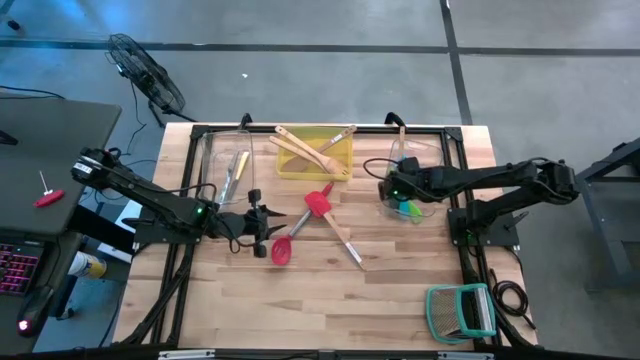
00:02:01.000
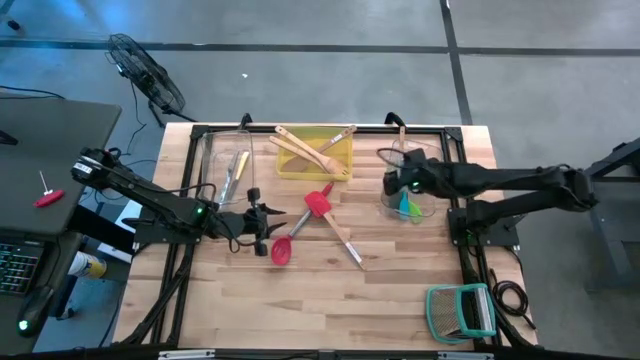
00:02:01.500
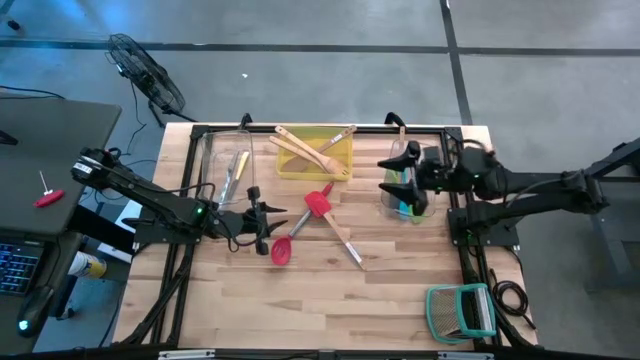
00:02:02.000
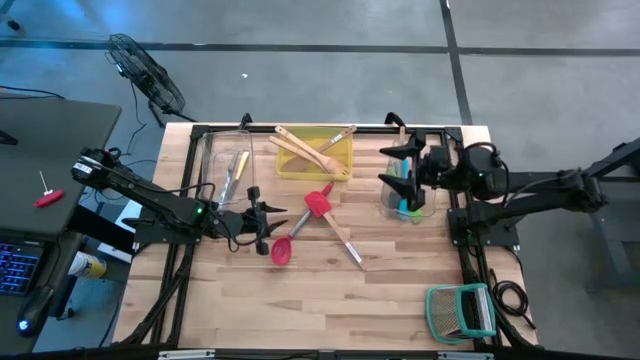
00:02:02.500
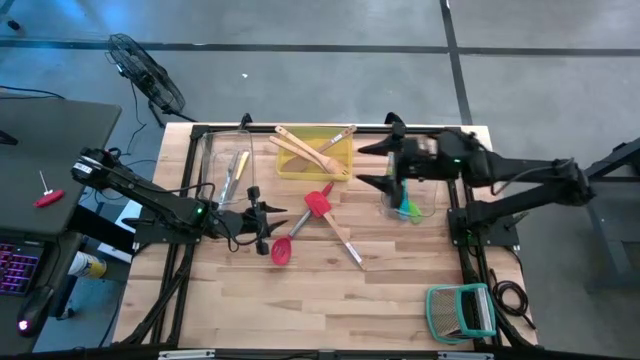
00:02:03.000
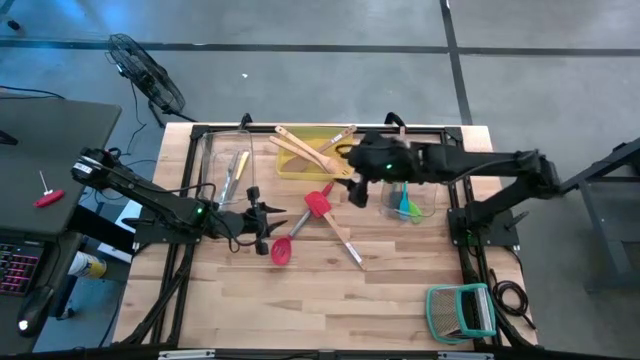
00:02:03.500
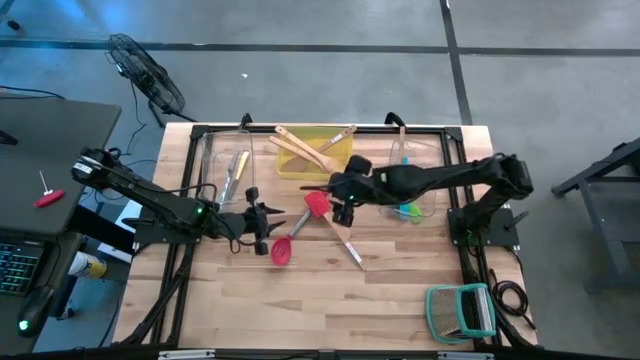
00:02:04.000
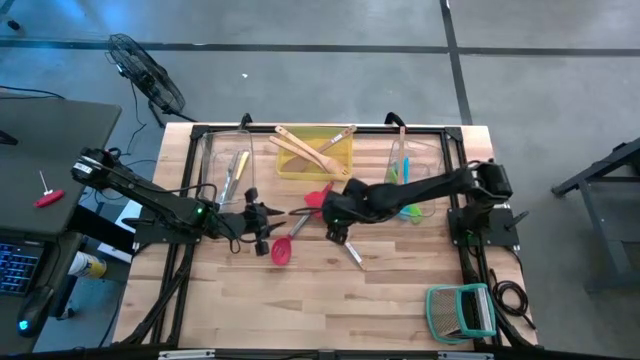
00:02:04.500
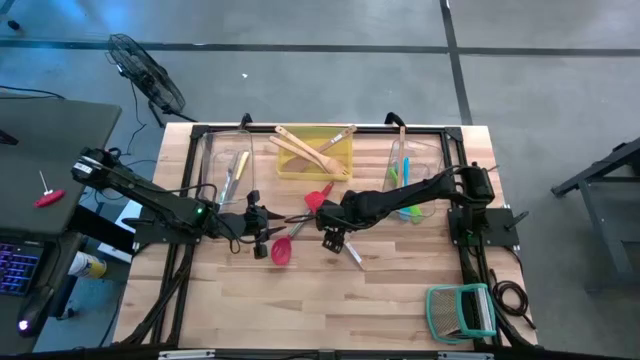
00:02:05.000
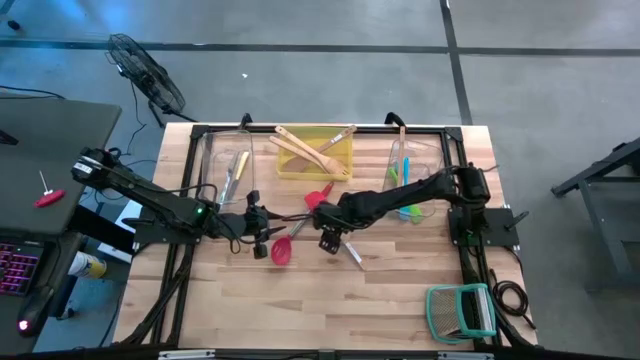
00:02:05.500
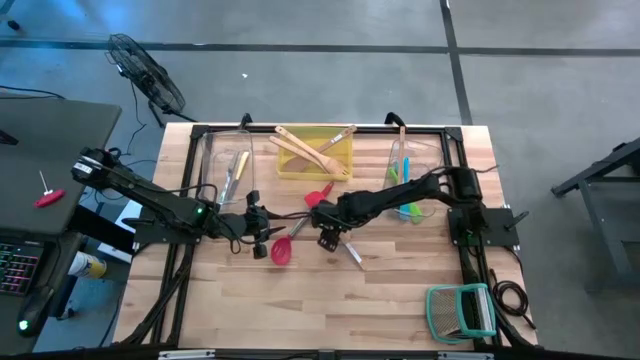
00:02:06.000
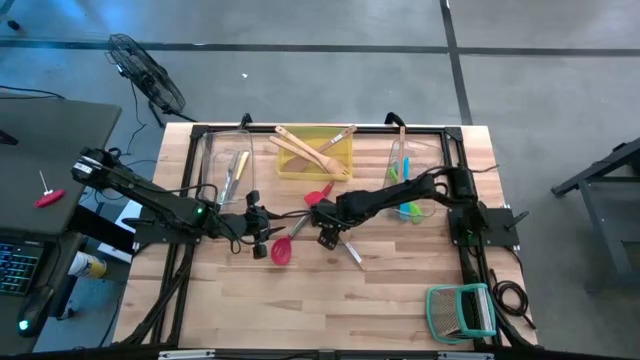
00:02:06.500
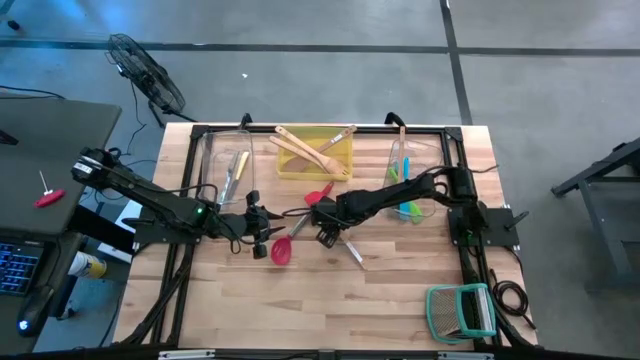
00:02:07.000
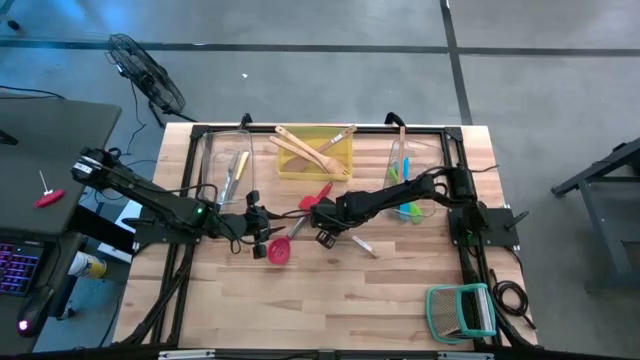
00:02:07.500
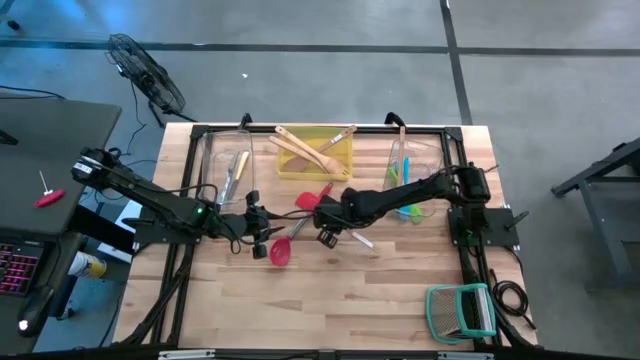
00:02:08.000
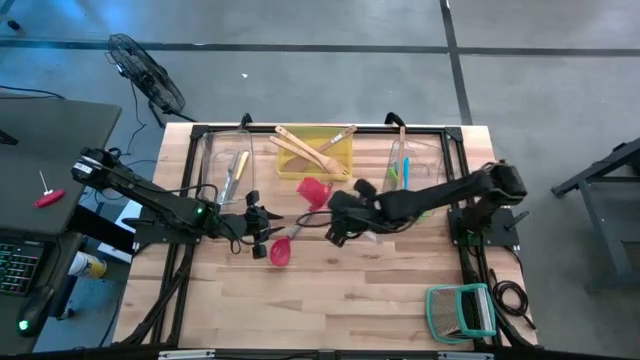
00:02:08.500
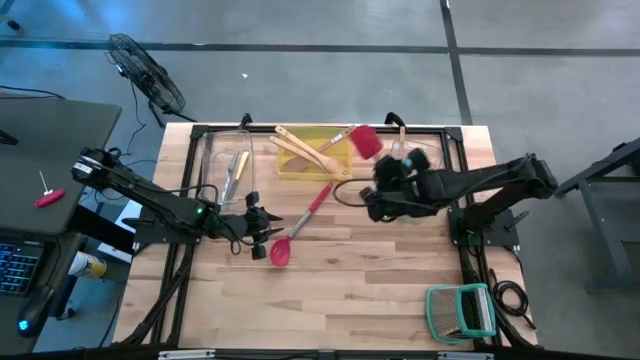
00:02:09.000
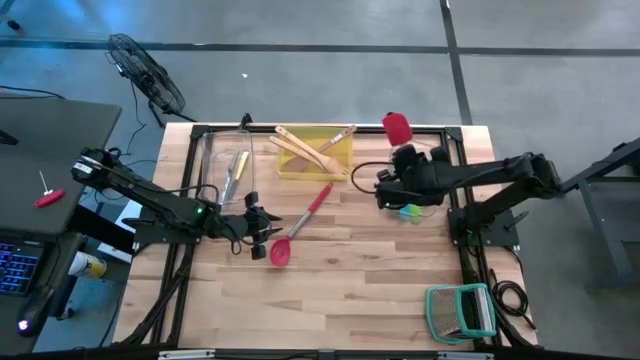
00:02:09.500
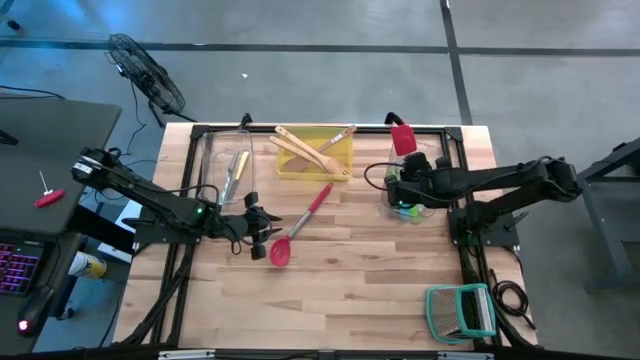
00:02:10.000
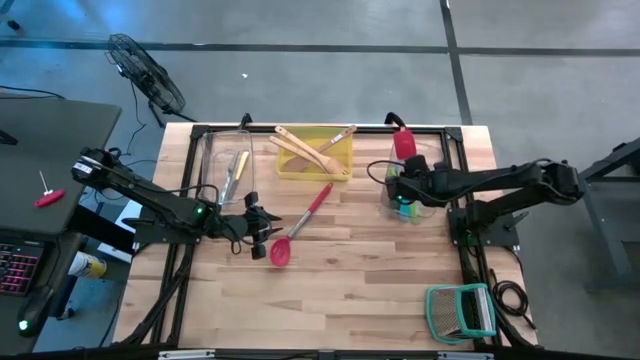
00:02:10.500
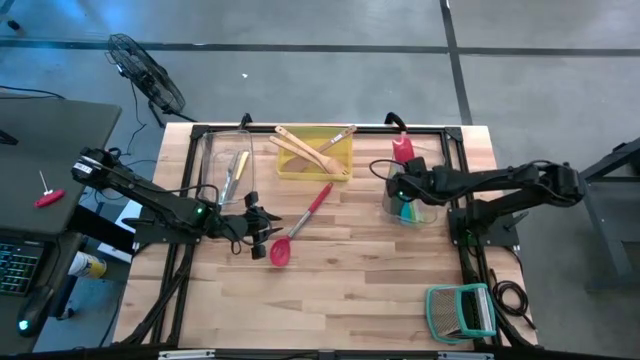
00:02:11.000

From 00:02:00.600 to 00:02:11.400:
Task: Pick & Place Kitchen Items
Put the red spatula into the right transparent bin

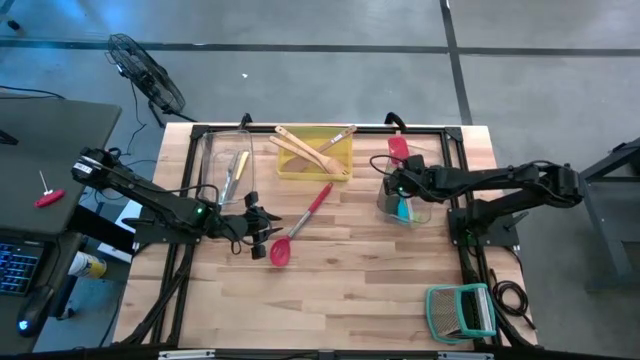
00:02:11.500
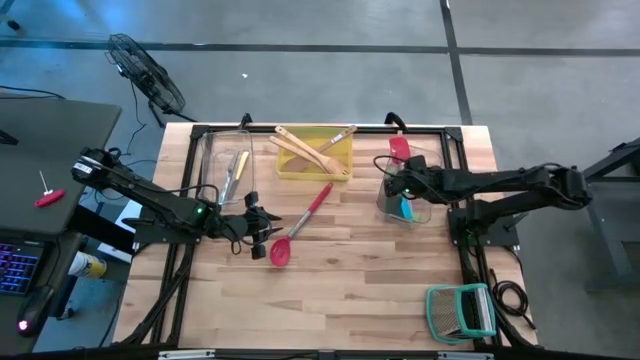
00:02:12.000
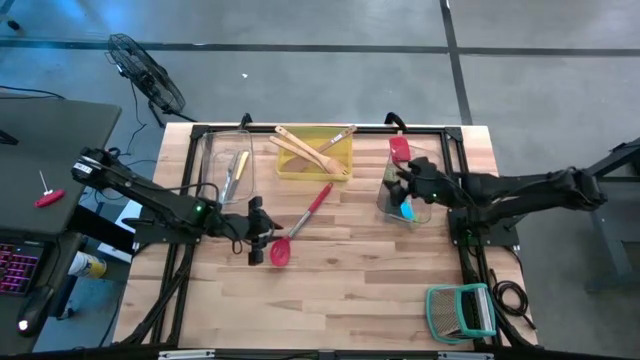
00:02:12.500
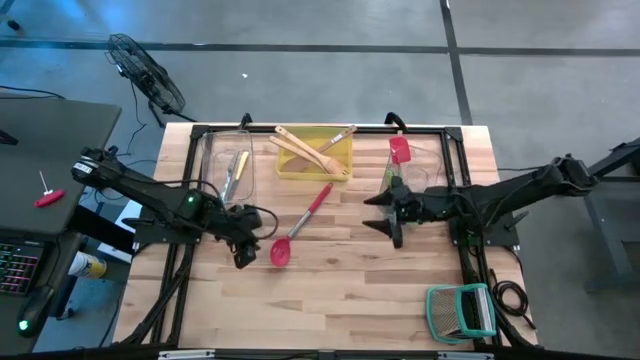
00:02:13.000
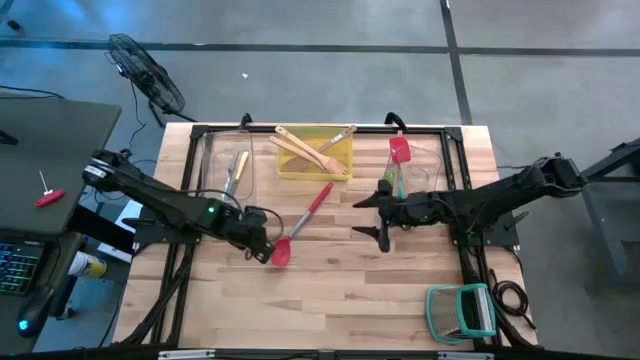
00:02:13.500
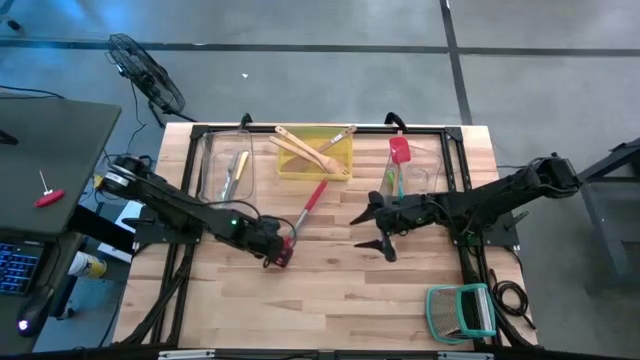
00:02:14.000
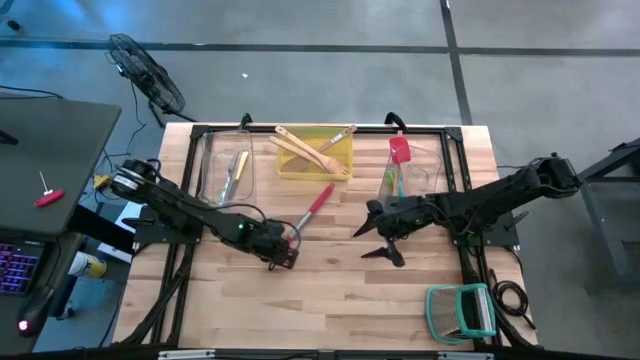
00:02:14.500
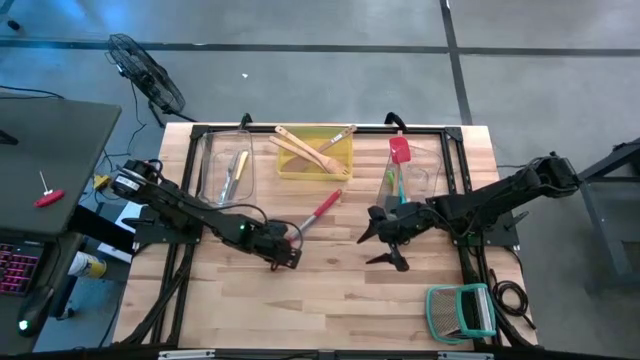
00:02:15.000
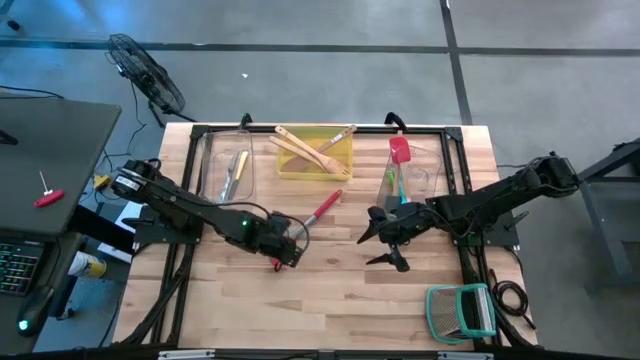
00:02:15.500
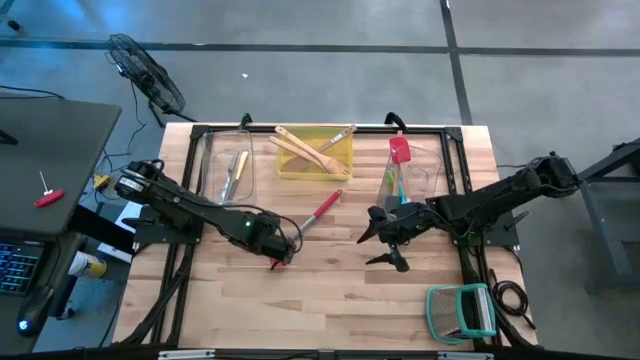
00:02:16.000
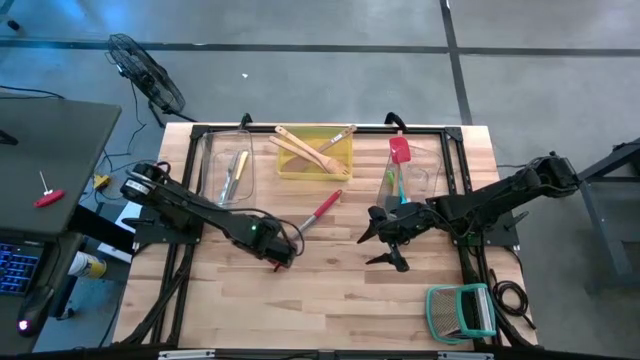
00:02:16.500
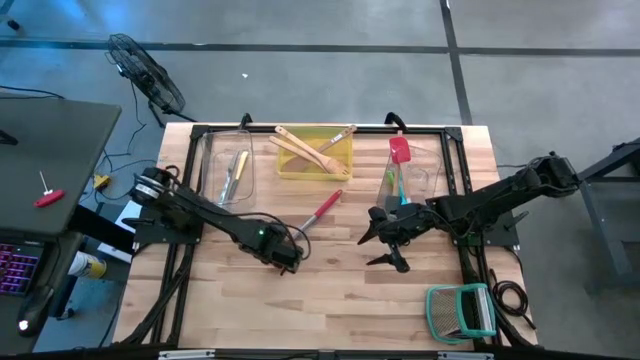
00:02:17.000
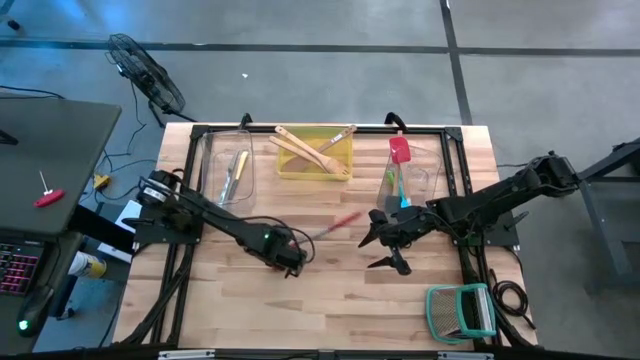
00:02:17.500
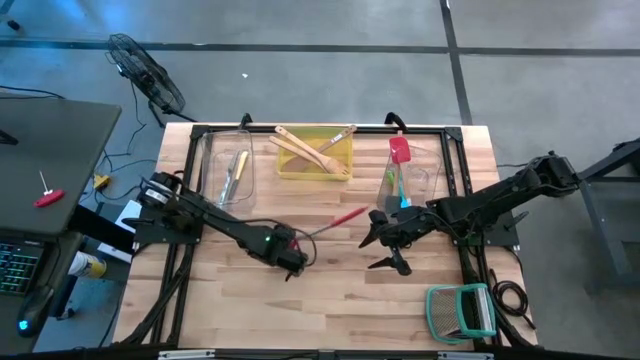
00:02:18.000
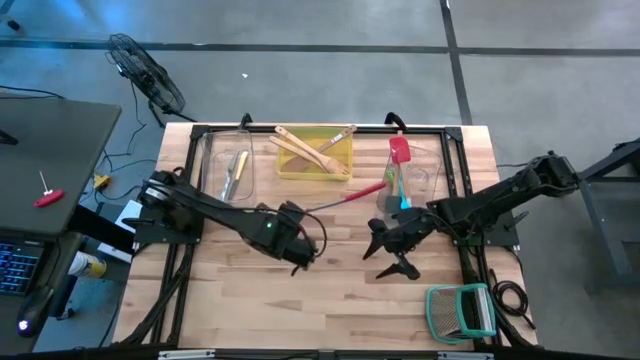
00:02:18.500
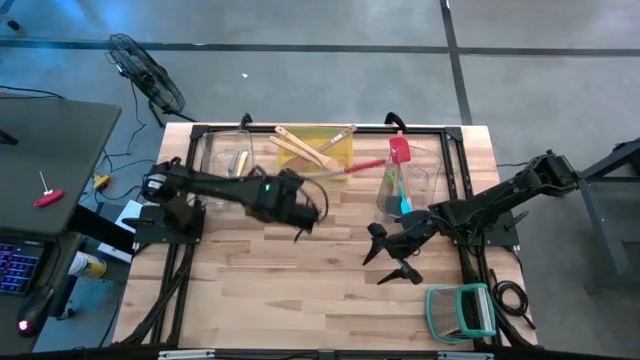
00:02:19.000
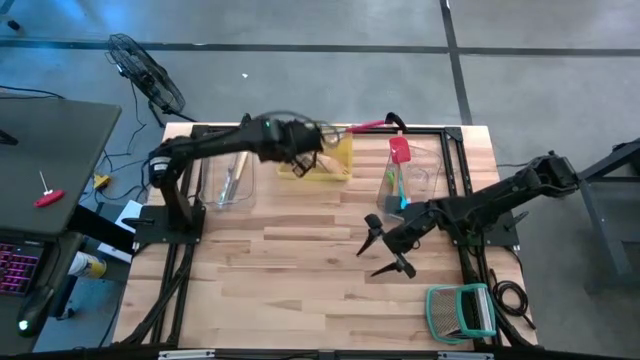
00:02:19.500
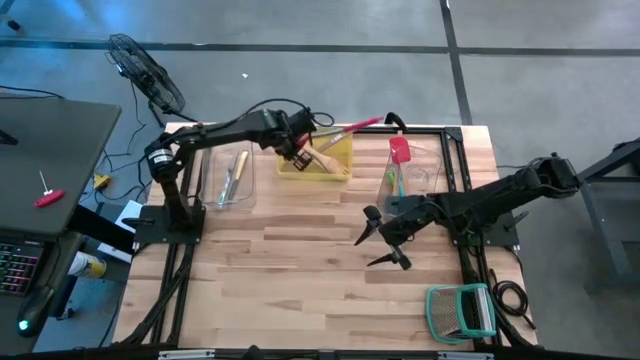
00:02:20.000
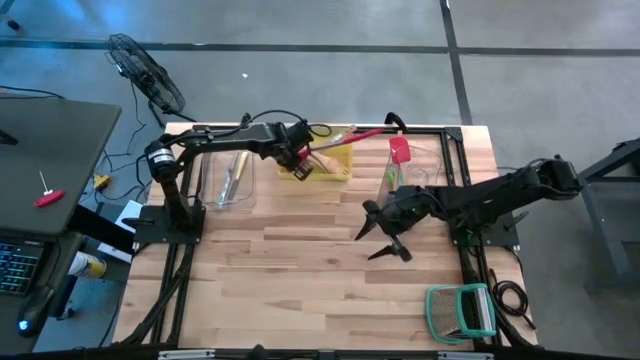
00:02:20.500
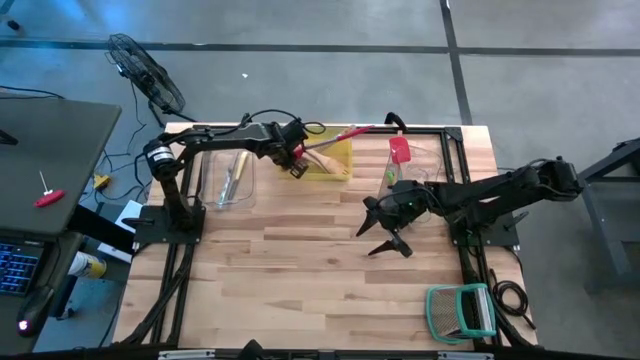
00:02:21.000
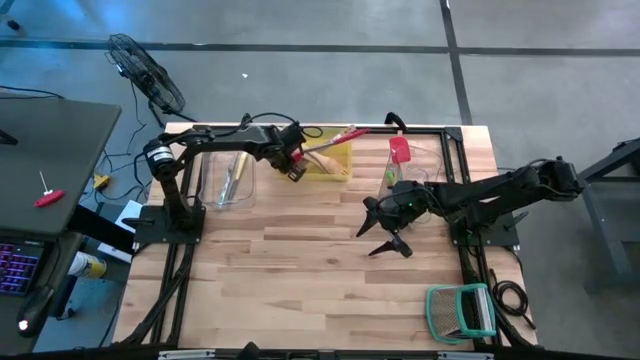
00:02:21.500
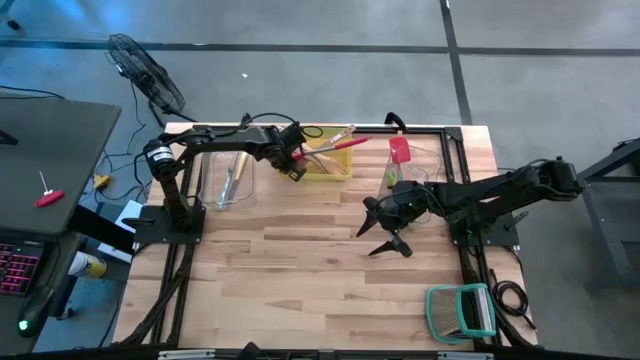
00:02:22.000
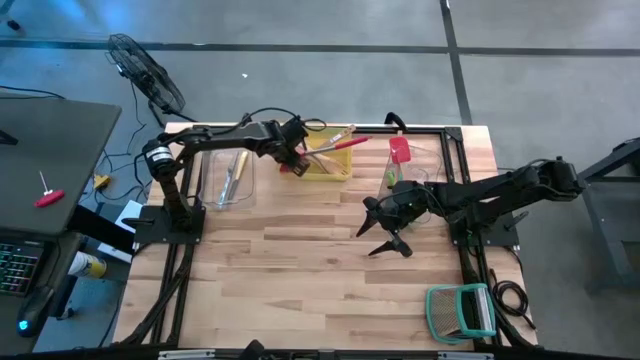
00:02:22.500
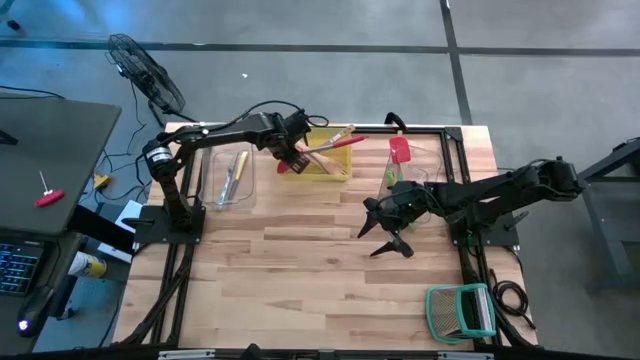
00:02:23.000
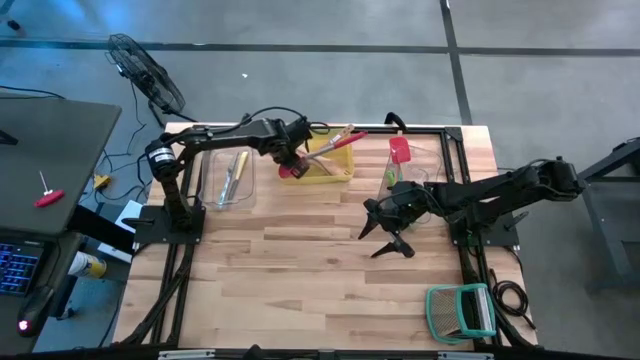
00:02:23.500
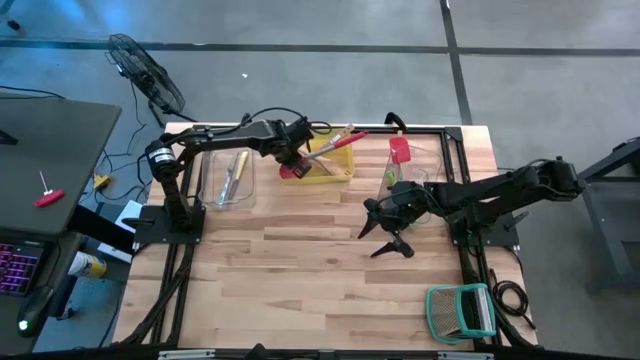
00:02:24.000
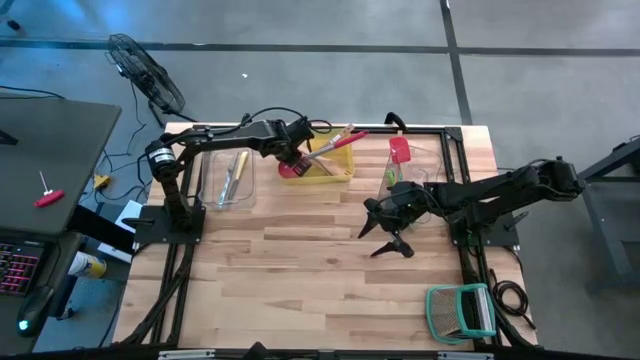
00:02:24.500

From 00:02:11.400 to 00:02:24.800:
Put the red slotted serving spoon into the right yellow bin
